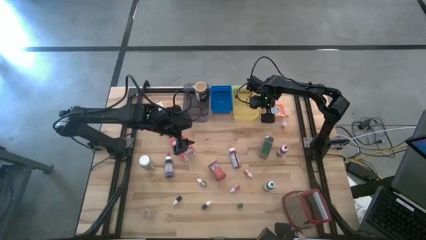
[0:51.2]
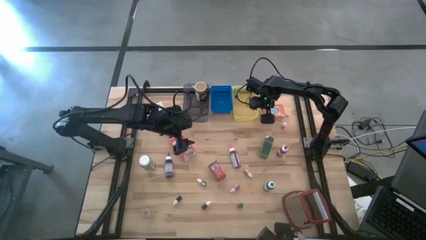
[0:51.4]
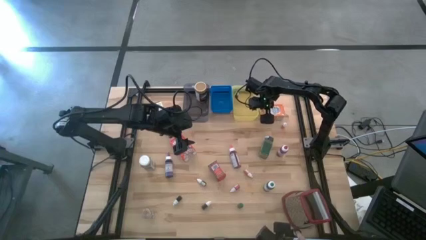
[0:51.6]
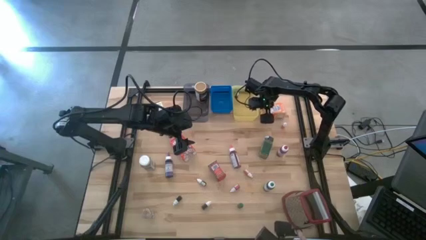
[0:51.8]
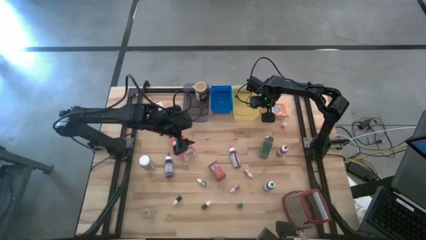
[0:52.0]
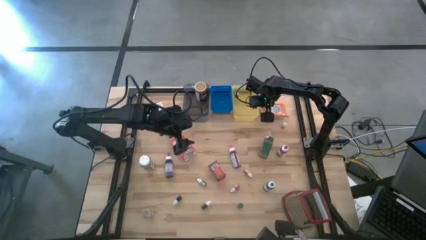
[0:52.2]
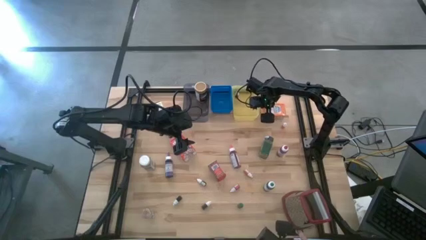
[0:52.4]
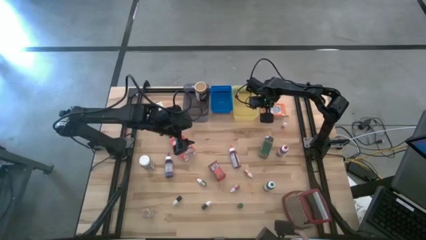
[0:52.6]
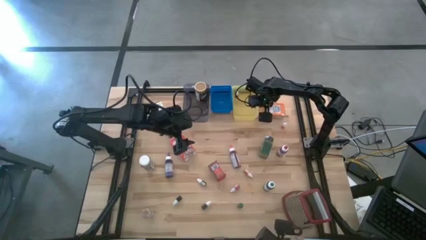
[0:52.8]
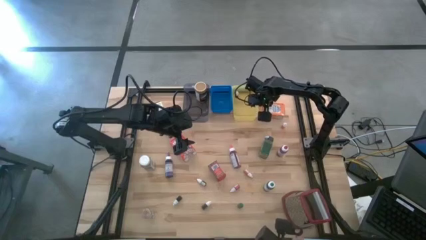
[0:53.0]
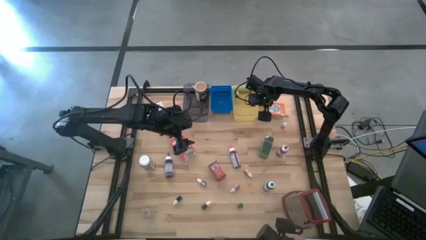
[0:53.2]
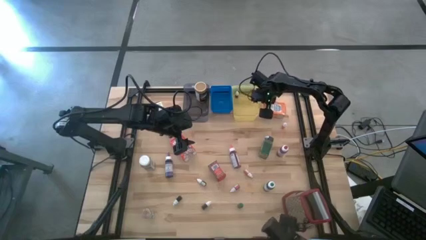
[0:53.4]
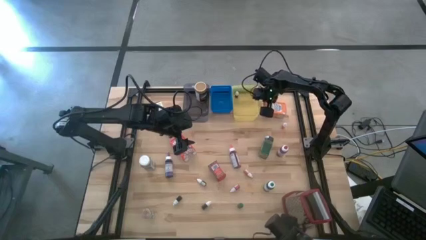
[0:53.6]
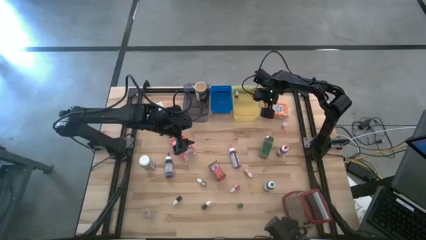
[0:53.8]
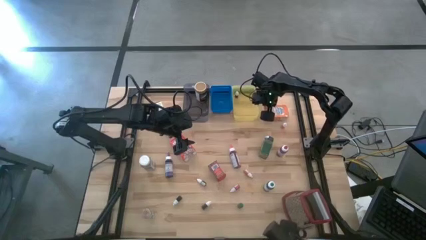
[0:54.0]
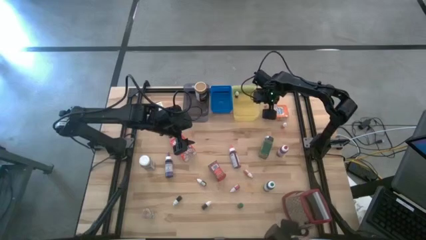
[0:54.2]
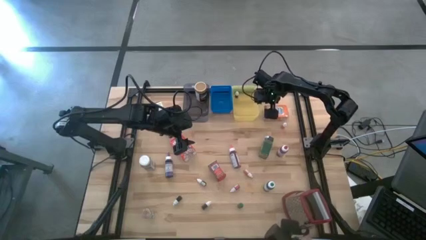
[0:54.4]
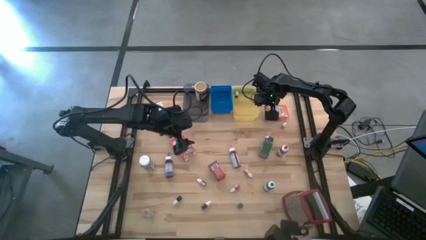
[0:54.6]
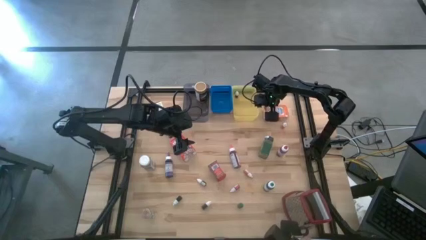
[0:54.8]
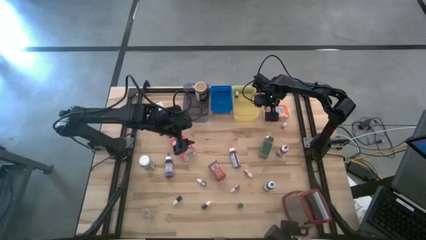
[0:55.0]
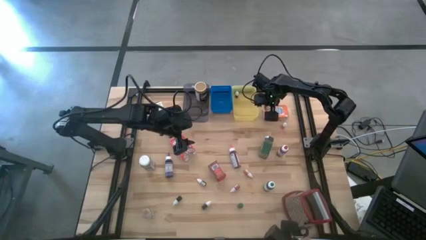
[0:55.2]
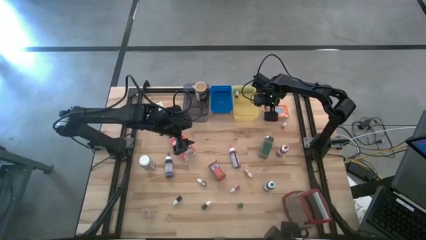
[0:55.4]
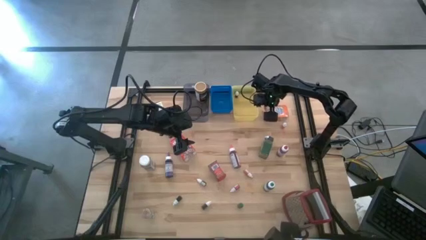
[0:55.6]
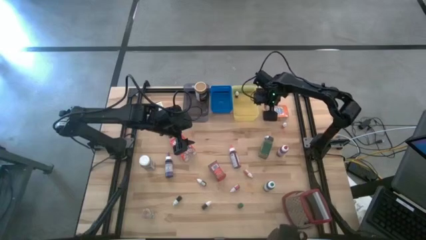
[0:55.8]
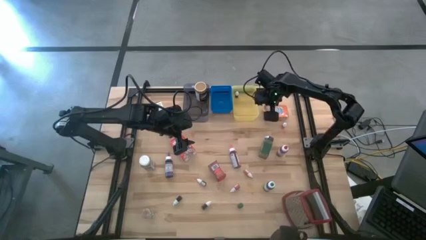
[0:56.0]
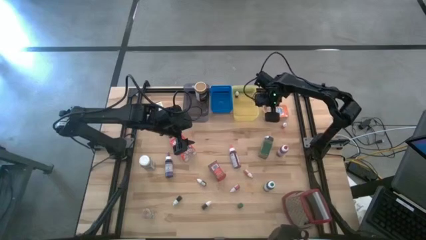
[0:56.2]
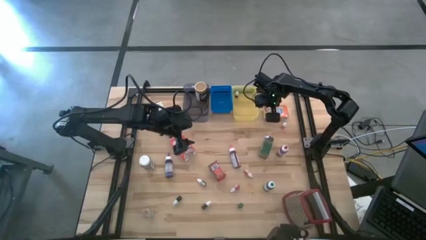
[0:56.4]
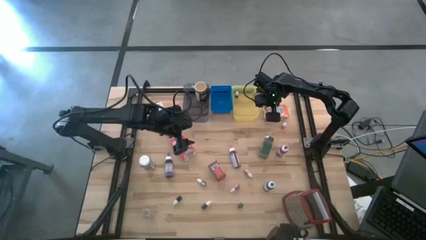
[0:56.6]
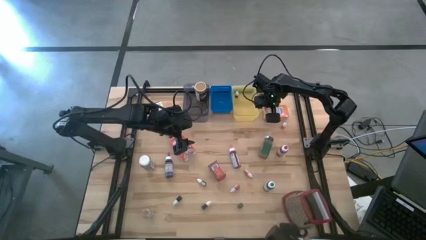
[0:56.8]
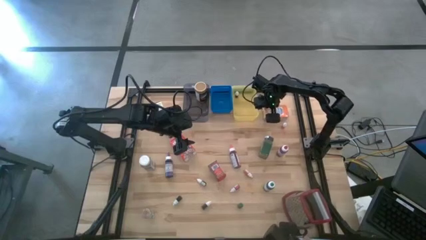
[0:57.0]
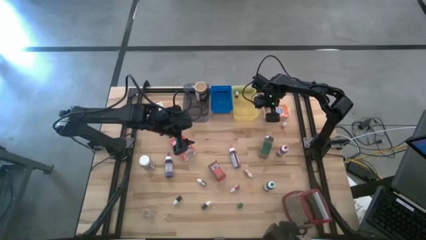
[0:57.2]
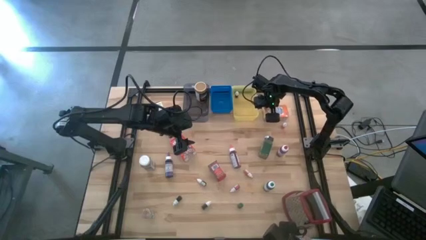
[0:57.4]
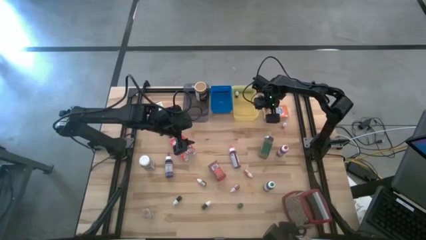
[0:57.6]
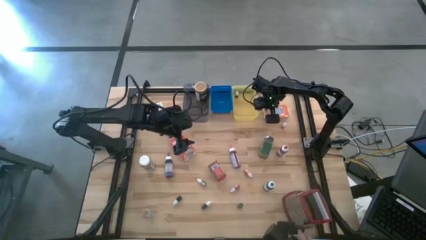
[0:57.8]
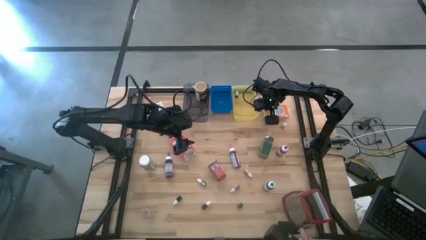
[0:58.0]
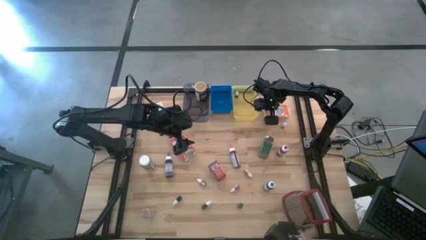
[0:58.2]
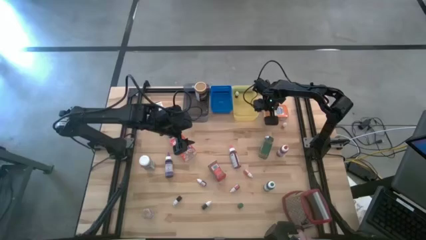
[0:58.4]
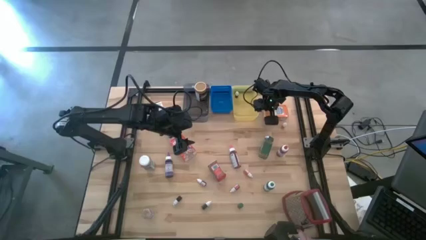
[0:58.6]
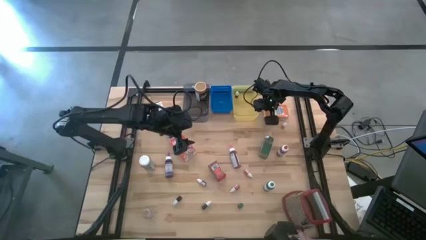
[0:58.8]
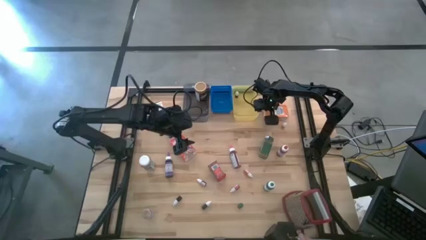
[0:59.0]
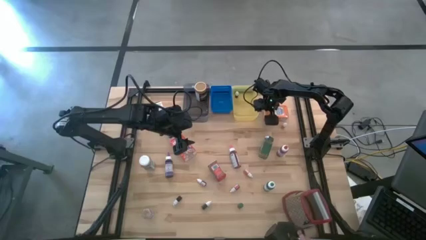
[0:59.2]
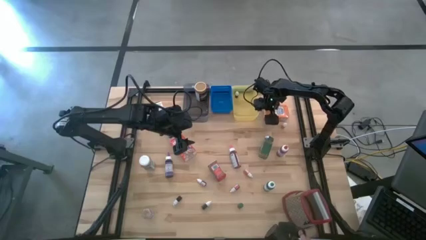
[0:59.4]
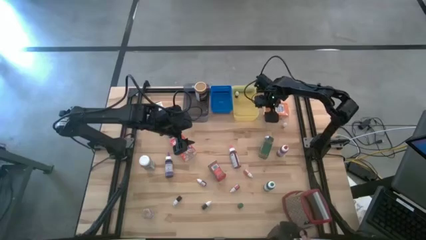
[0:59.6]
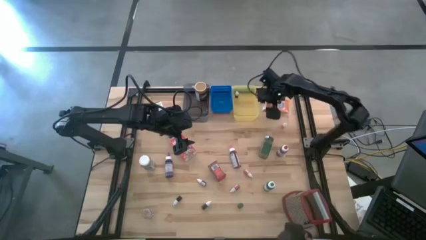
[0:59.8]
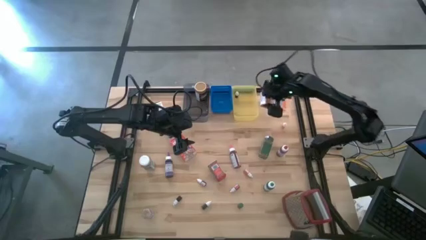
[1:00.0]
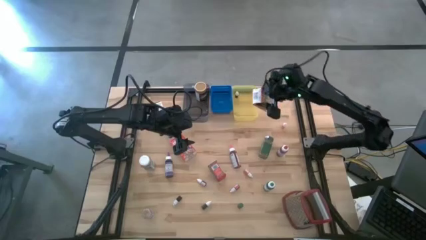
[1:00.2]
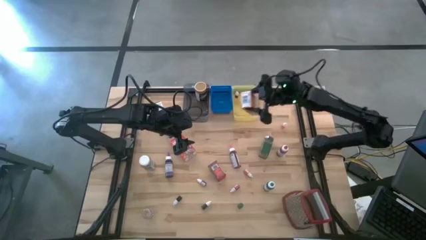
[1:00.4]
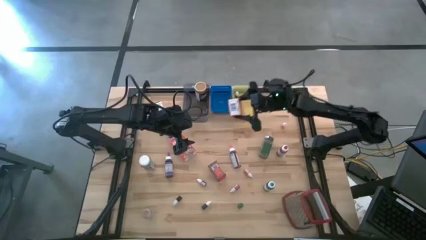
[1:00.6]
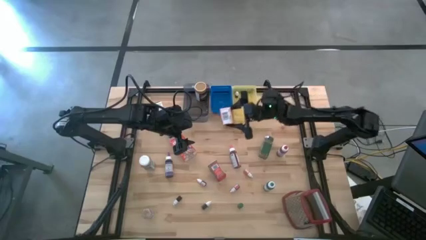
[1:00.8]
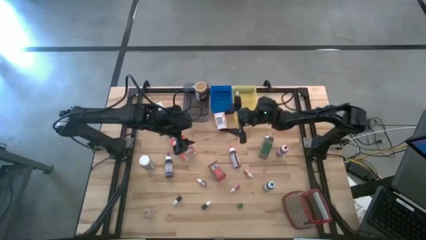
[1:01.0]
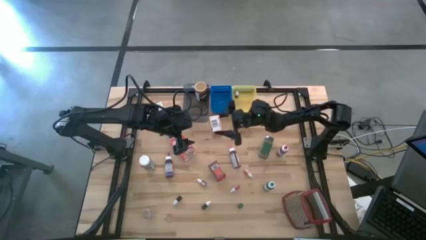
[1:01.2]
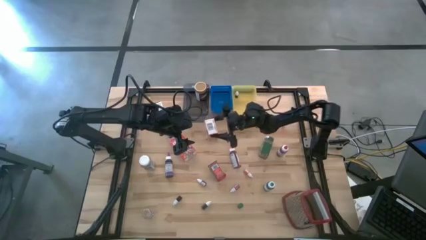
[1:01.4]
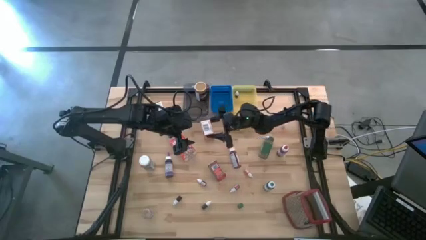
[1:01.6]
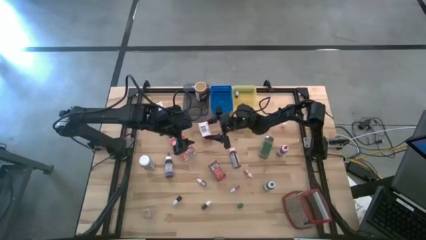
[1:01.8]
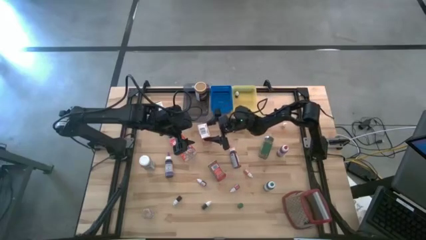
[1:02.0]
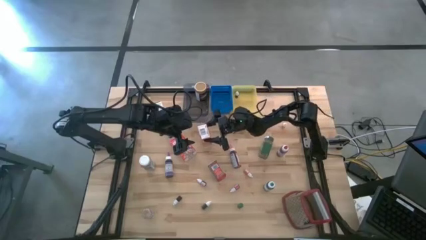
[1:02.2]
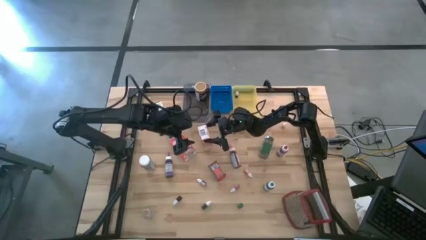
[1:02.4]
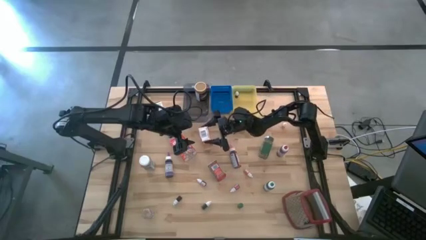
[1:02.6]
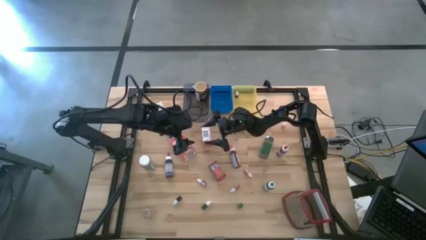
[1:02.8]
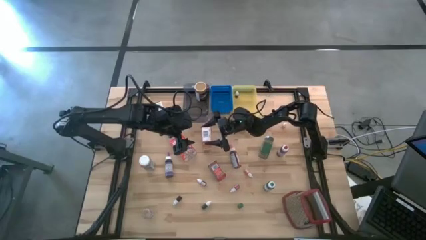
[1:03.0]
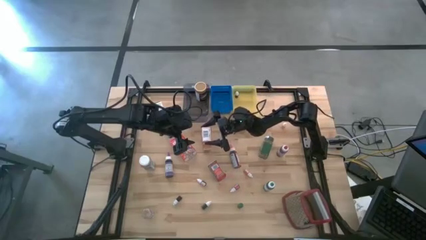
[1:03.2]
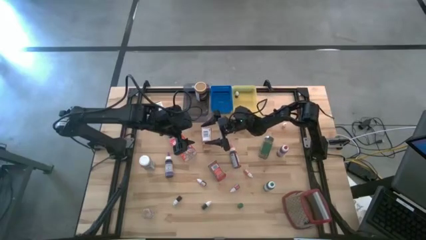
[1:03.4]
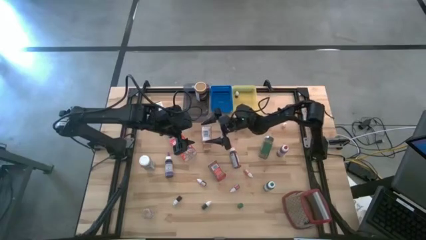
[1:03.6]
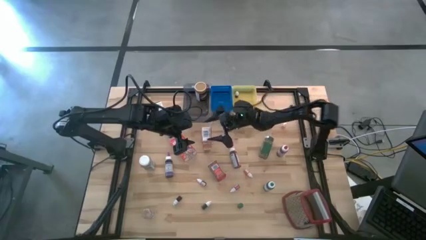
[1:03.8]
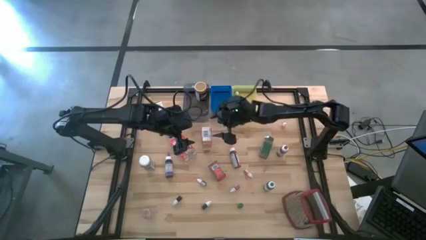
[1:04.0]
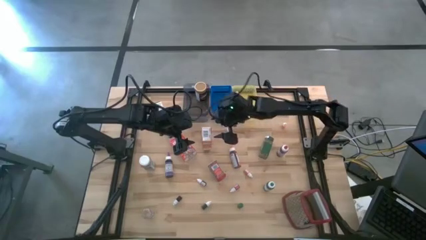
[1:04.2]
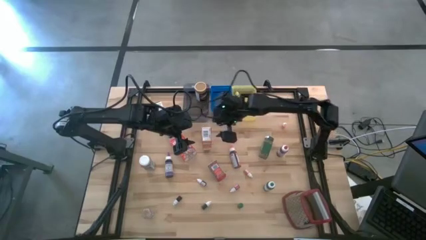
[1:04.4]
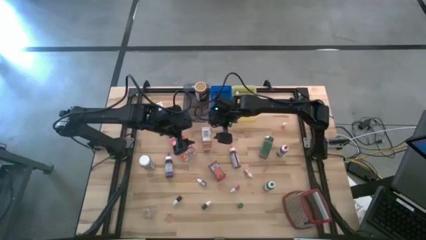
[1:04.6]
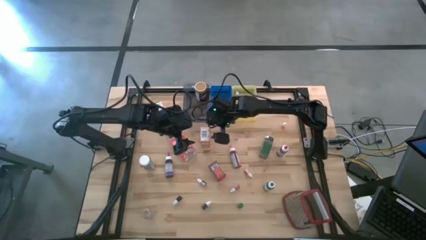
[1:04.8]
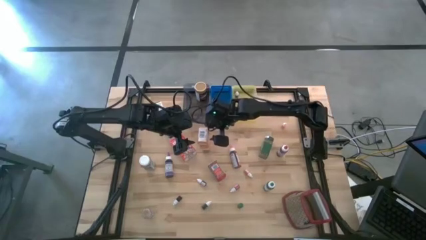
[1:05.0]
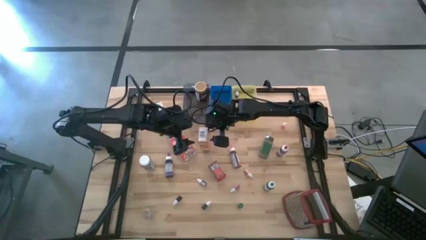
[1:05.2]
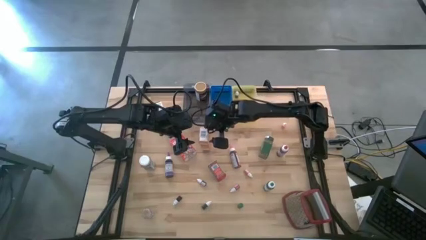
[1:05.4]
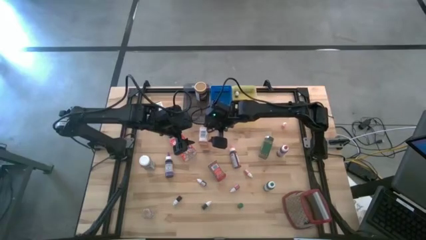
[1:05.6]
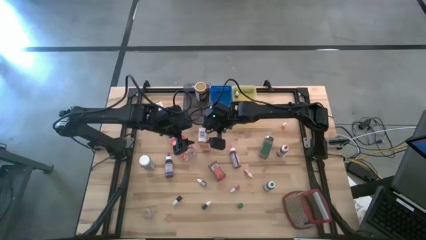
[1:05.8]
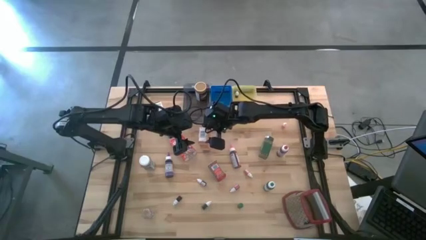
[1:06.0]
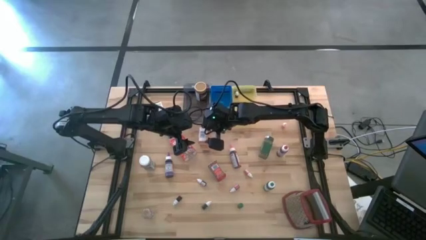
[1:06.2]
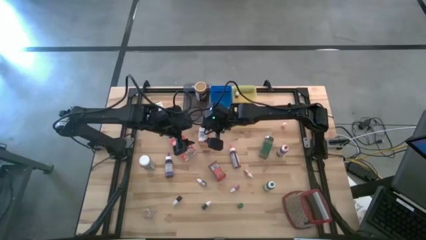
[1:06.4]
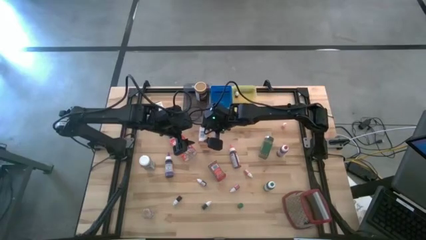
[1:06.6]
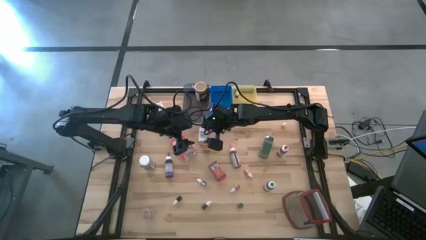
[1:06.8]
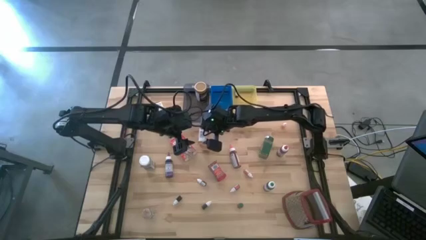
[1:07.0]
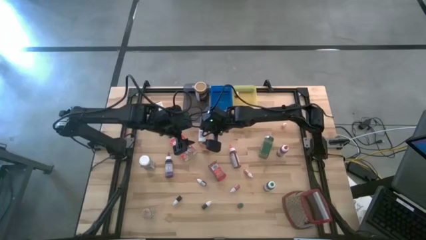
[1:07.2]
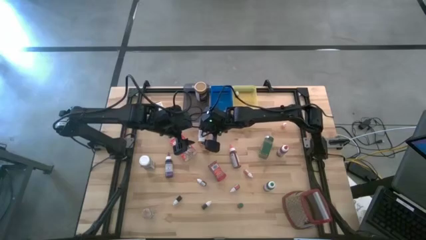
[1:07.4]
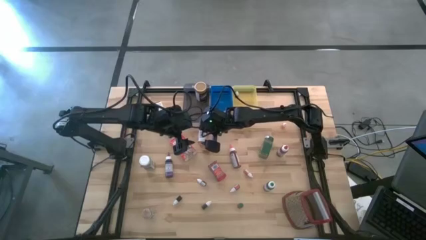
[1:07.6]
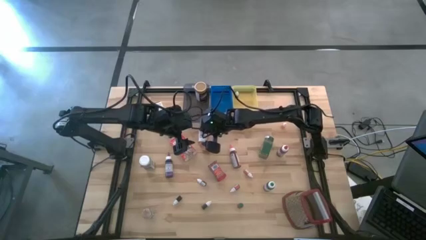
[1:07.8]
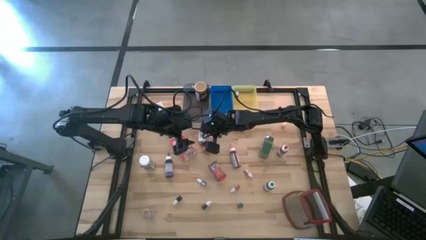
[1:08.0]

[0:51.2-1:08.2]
Task: Pick & Place Kitchen Items
Put the orange cereal box into the blue bin
